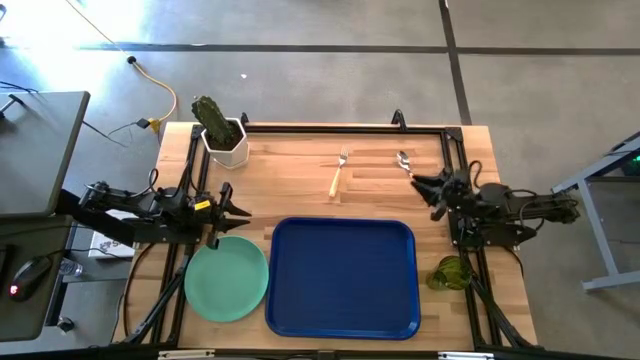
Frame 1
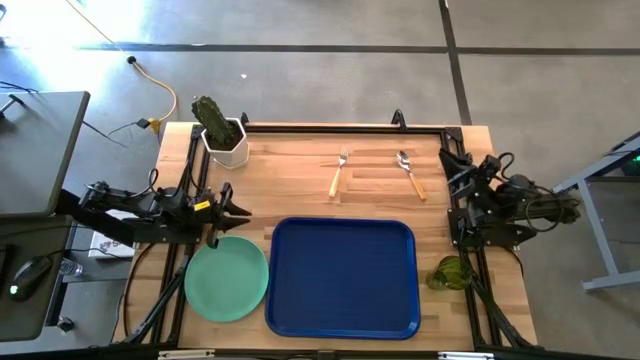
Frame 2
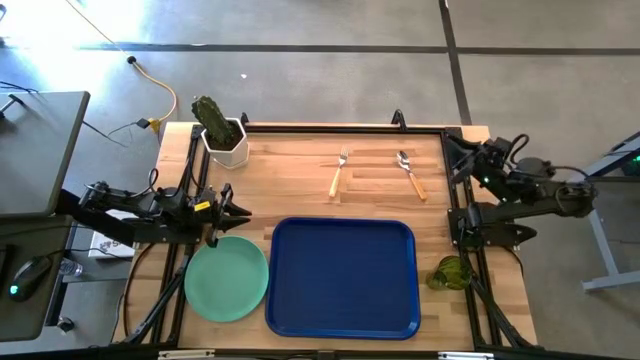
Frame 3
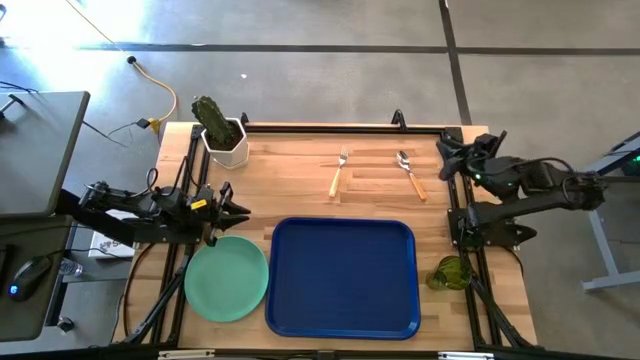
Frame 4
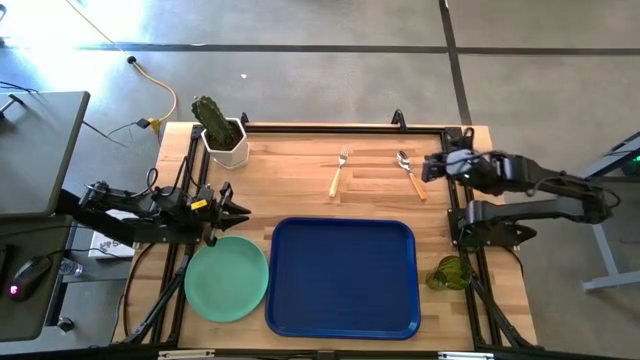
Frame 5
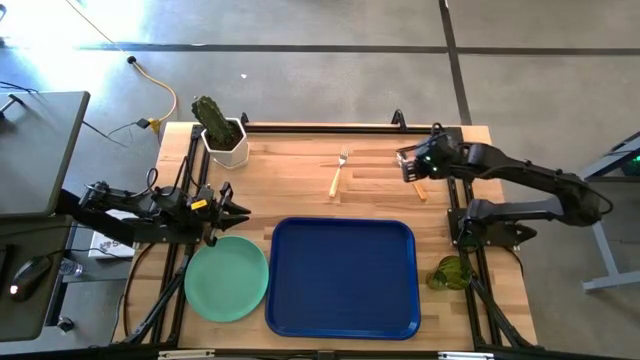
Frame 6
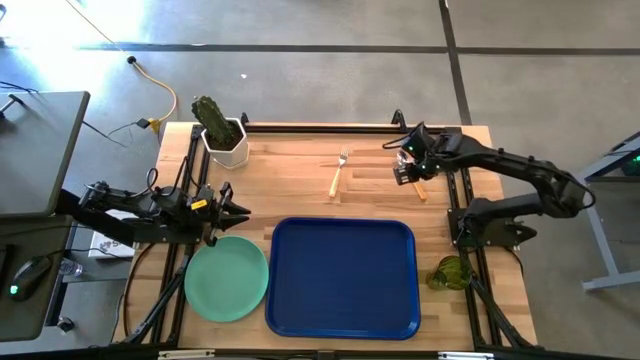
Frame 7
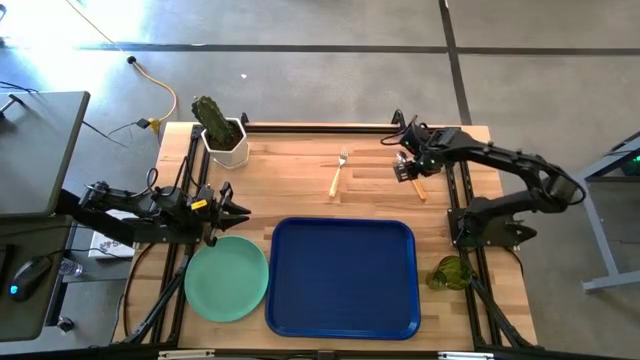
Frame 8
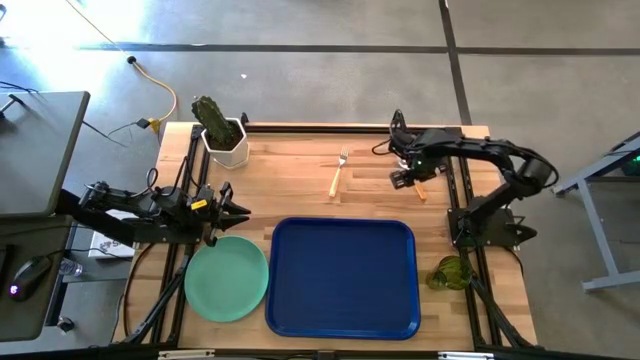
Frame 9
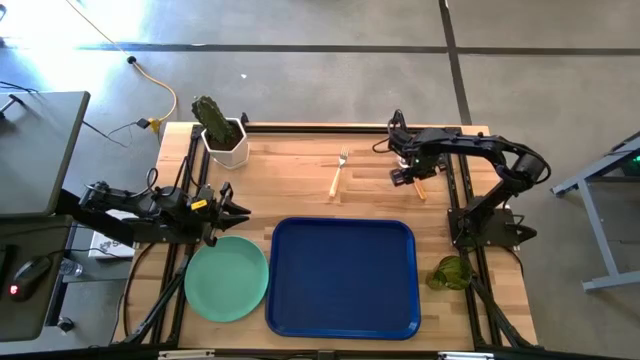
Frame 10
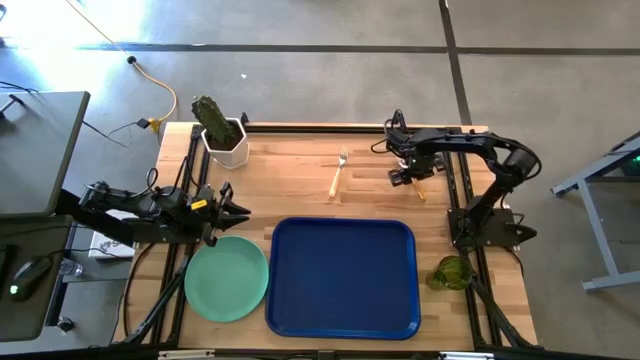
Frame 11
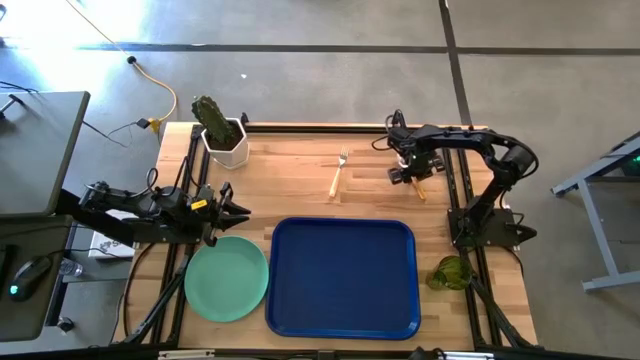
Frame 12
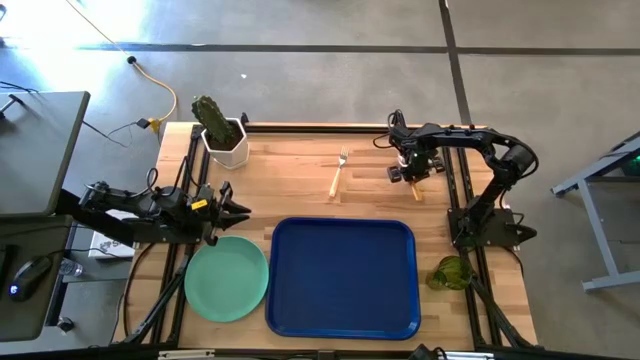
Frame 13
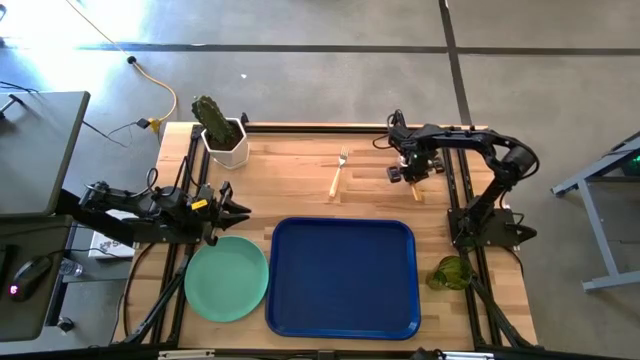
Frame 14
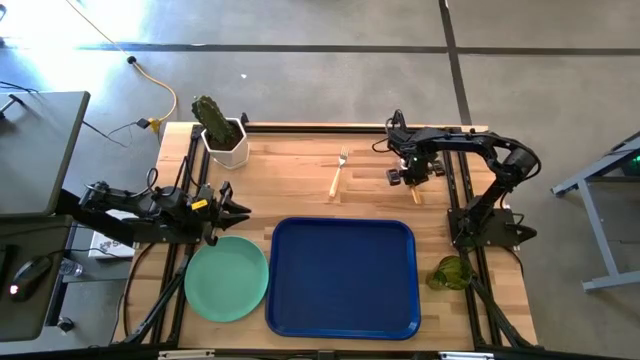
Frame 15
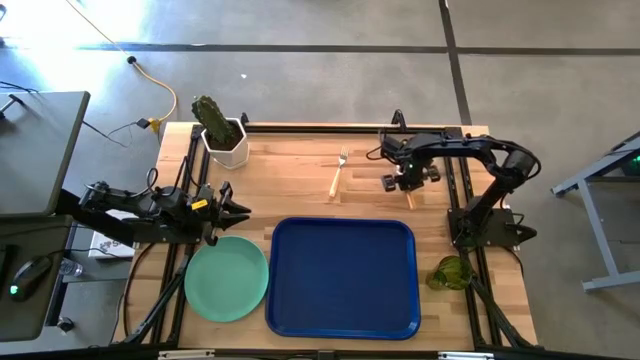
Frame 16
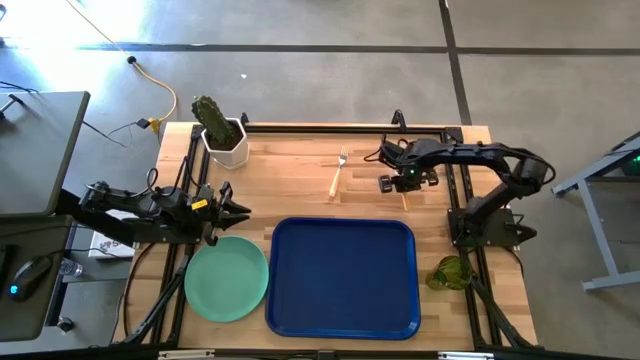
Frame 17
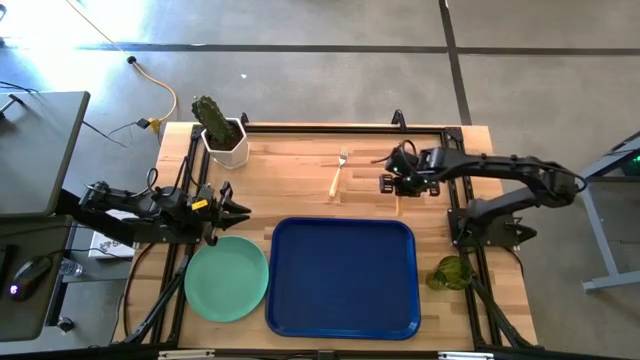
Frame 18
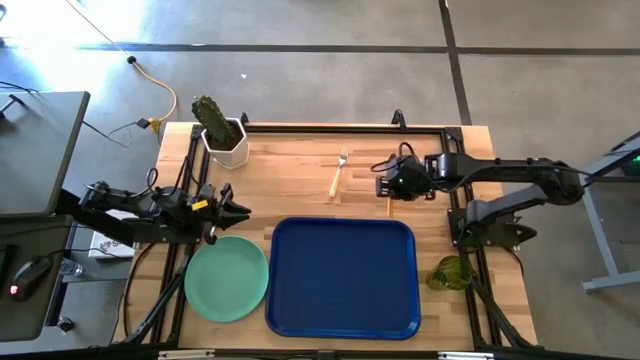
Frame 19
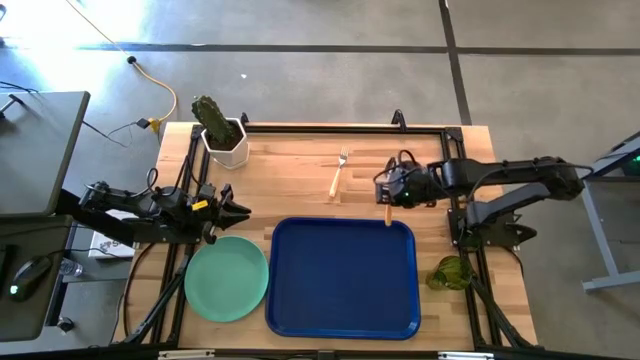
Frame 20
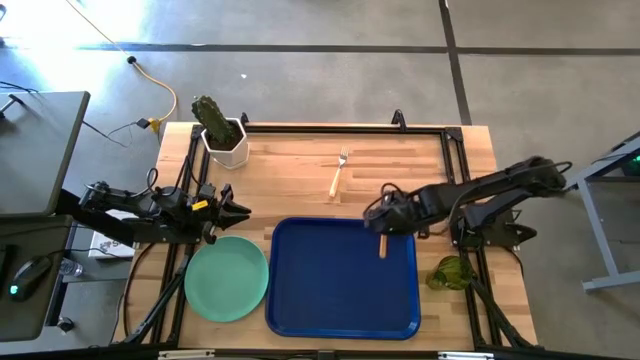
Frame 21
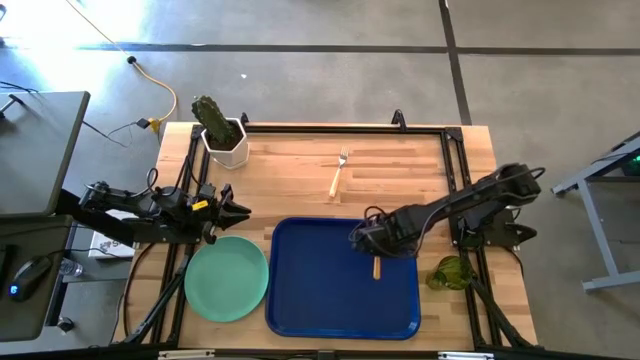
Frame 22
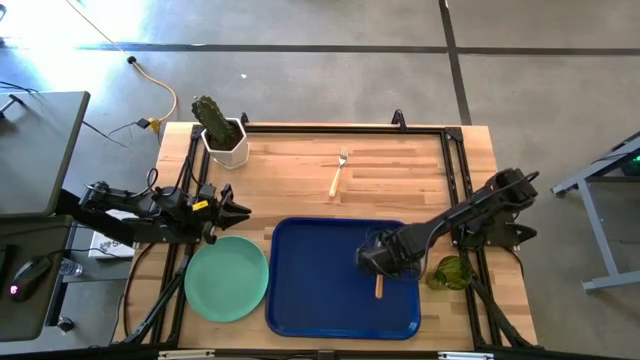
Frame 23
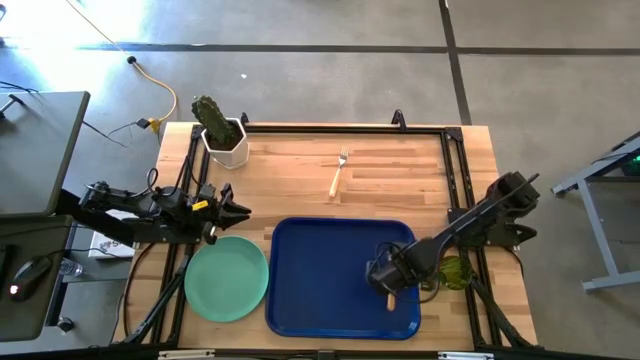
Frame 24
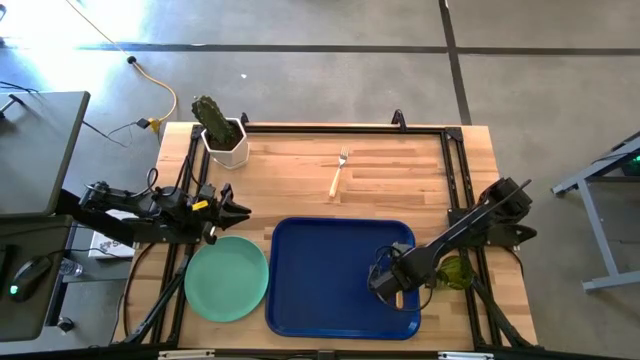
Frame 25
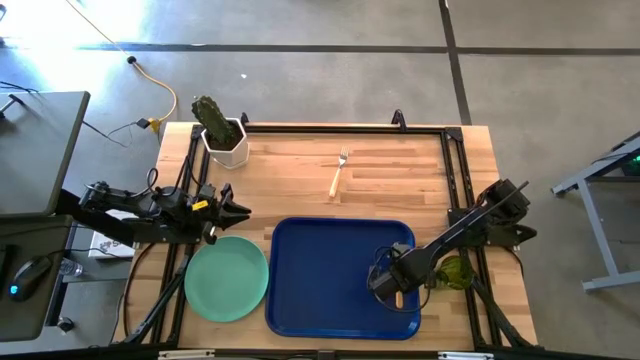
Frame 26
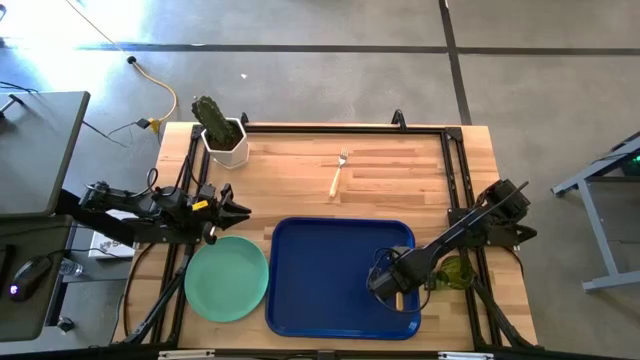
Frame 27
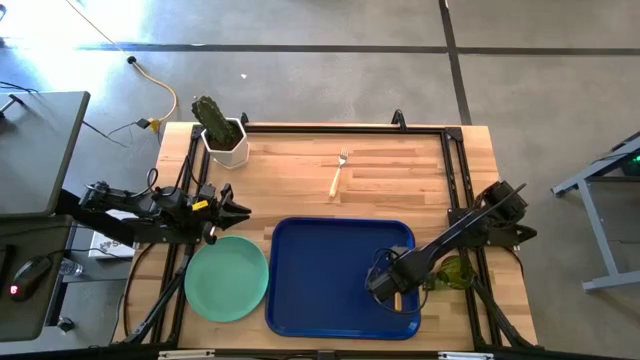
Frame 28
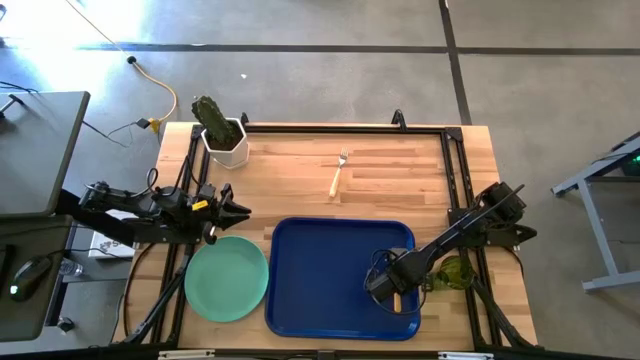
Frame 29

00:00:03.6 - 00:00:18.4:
Task: Pick and place plate/cup/fork/spoon on tray
Put the orange spoon on the blue tray

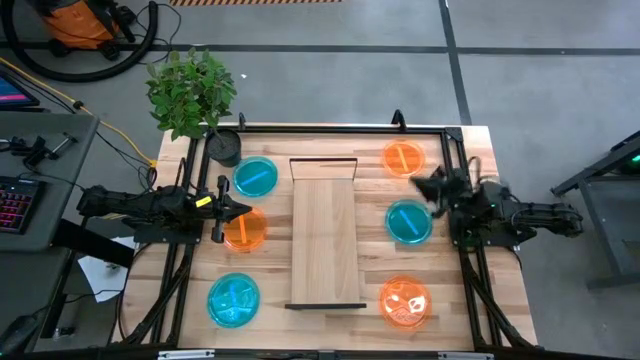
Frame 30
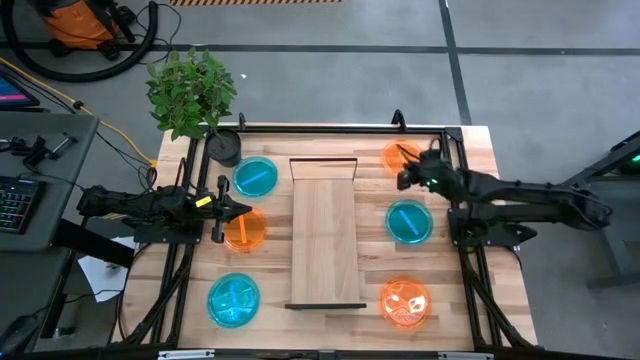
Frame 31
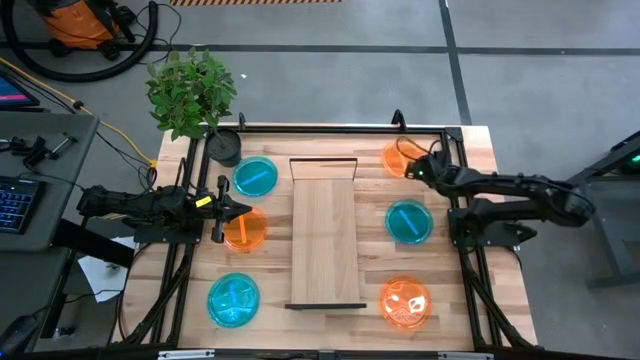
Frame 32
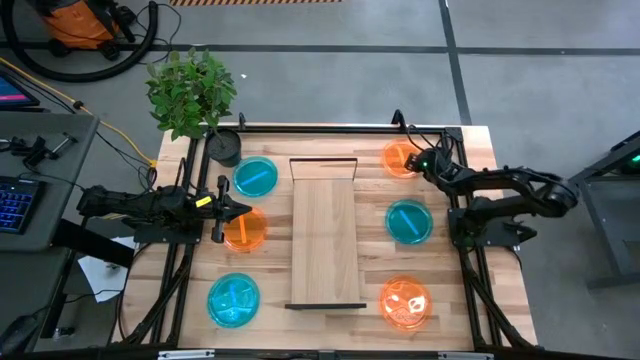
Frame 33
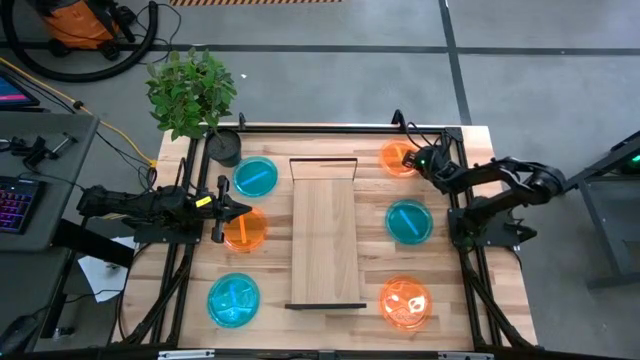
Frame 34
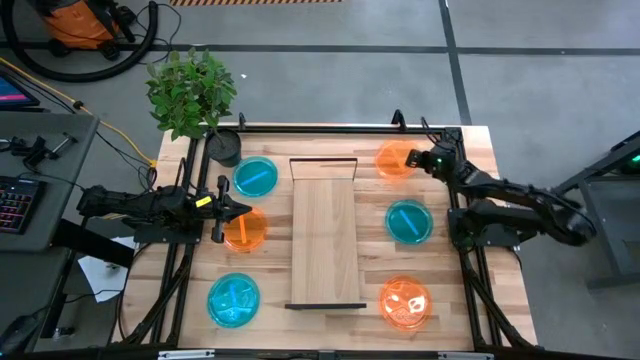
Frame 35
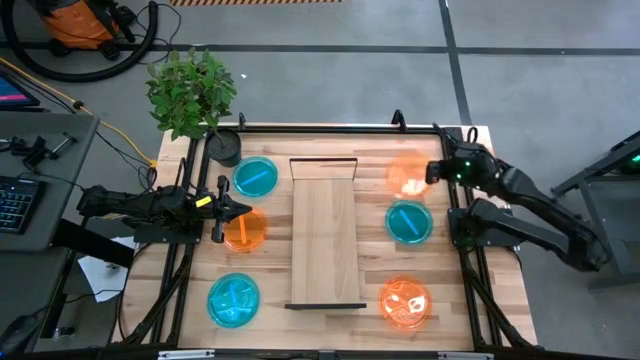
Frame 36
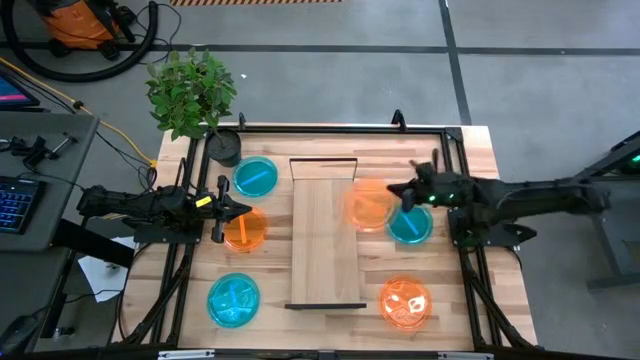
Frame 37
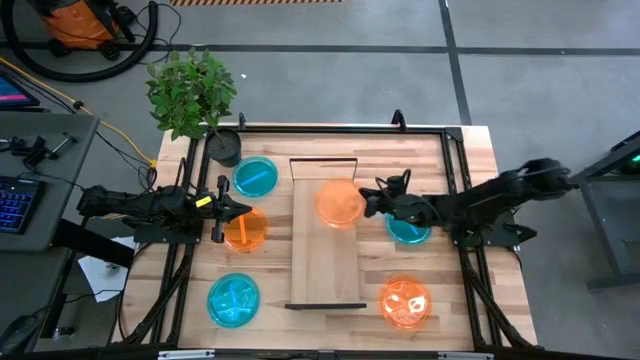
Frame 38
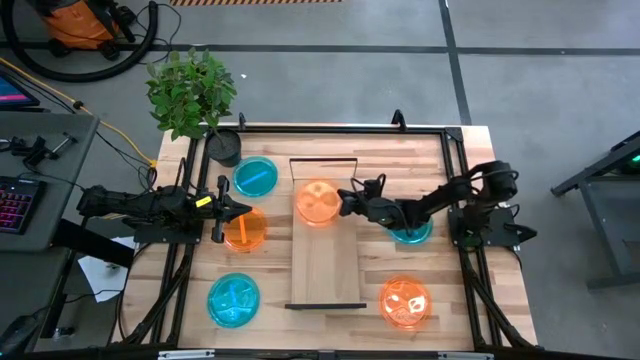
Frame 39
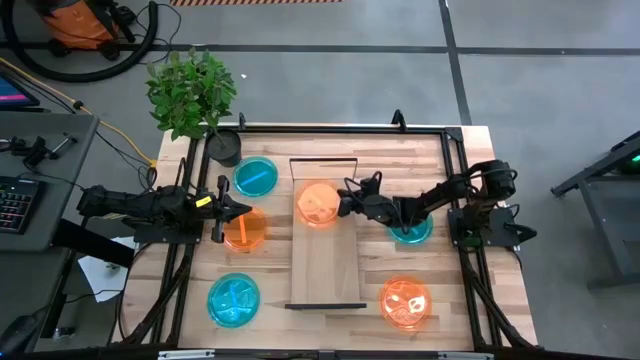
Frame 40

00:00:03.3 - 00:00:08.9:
Task: Place and stack plates onto a shelf
Put the top right orange plate on the shelf
